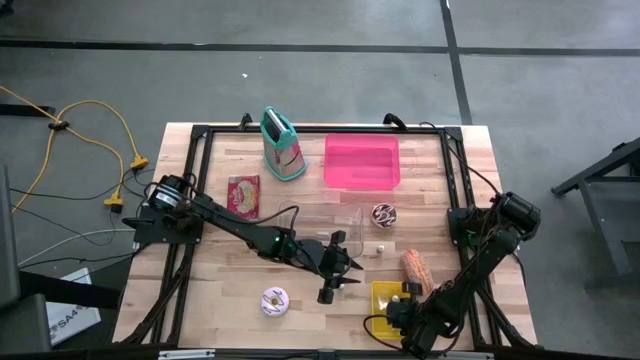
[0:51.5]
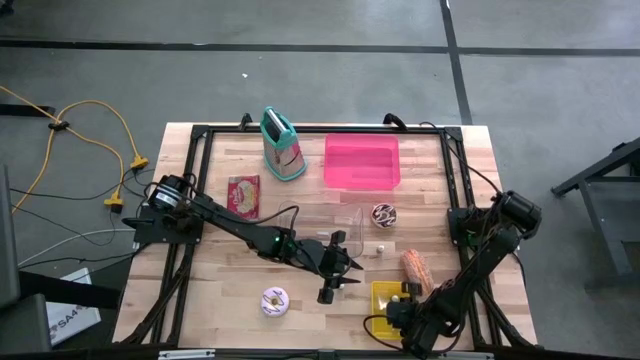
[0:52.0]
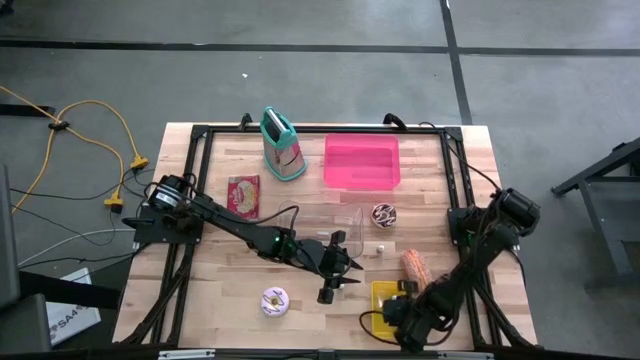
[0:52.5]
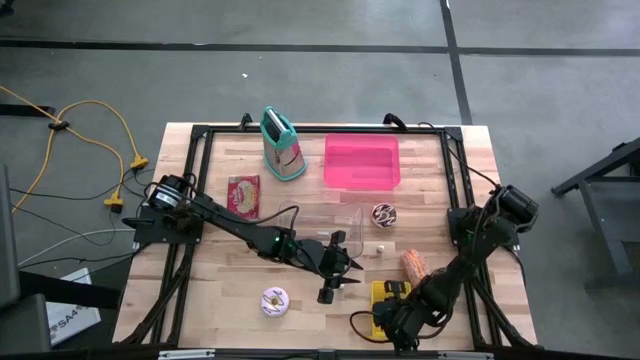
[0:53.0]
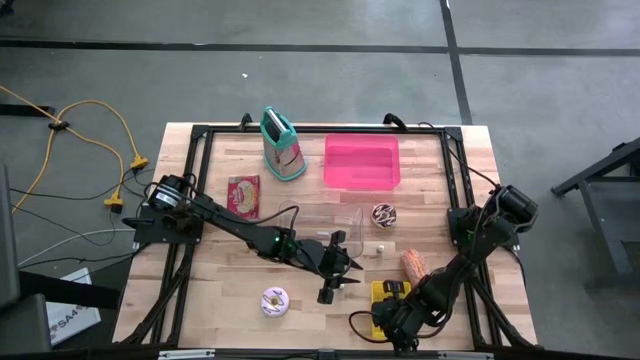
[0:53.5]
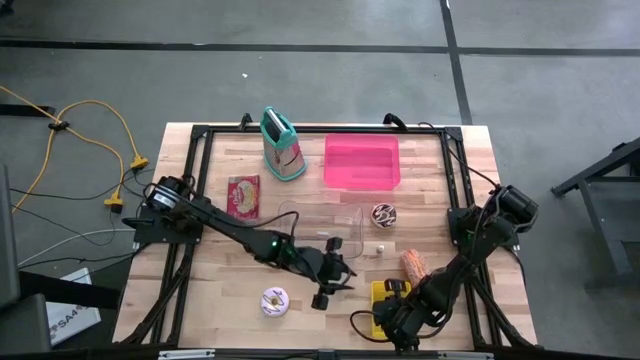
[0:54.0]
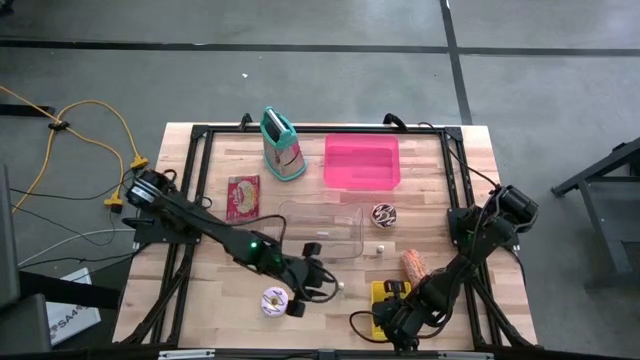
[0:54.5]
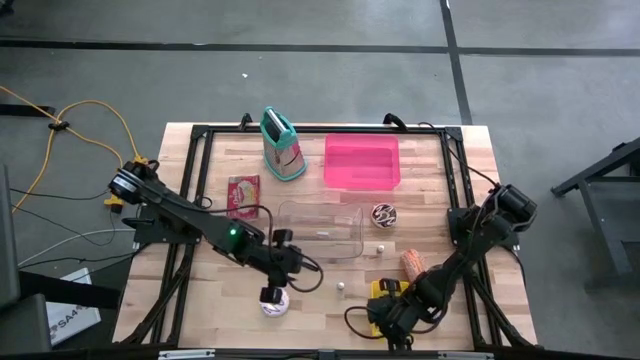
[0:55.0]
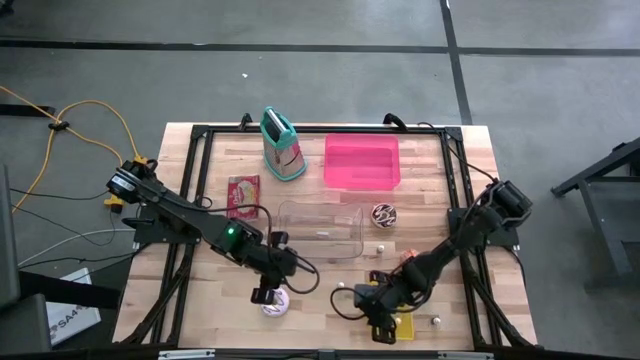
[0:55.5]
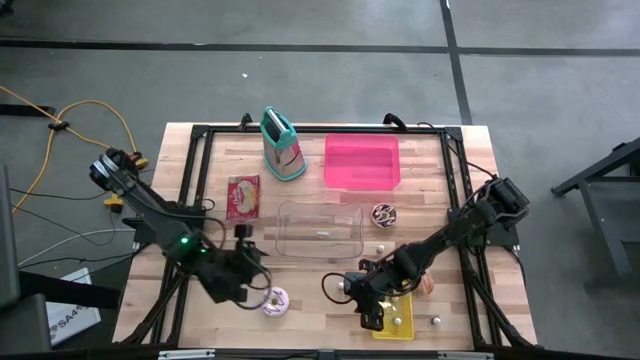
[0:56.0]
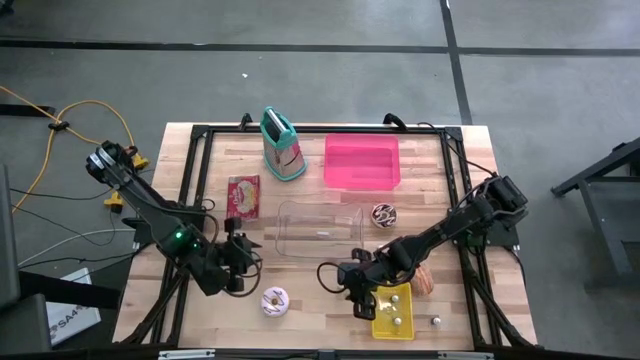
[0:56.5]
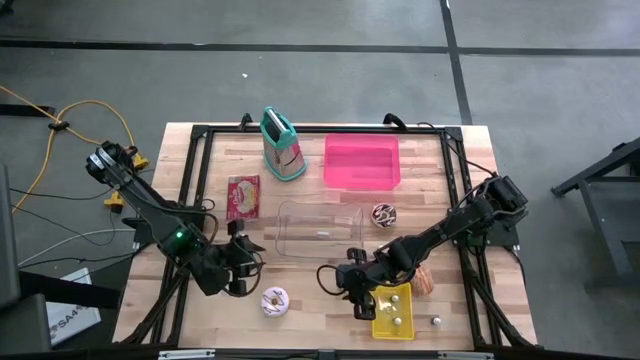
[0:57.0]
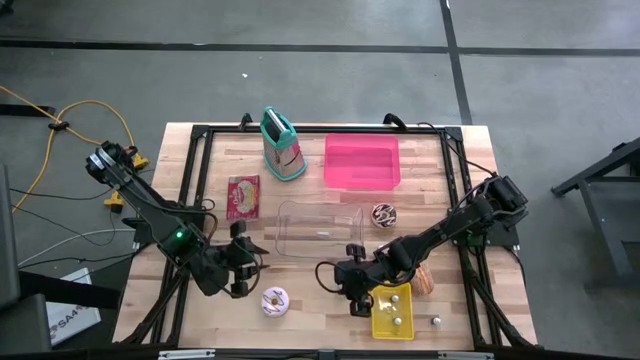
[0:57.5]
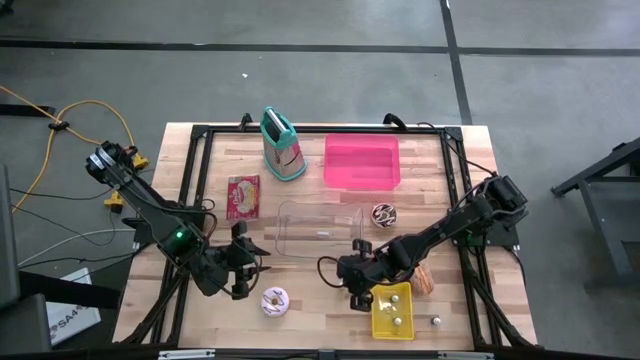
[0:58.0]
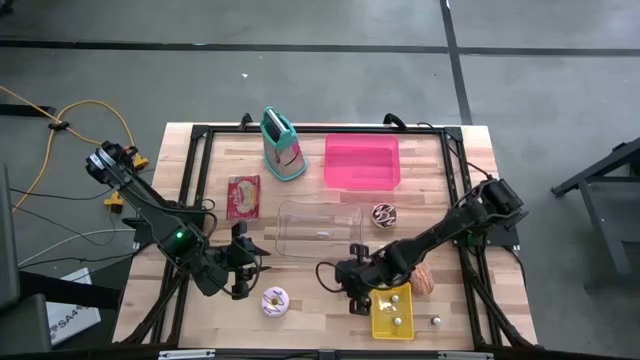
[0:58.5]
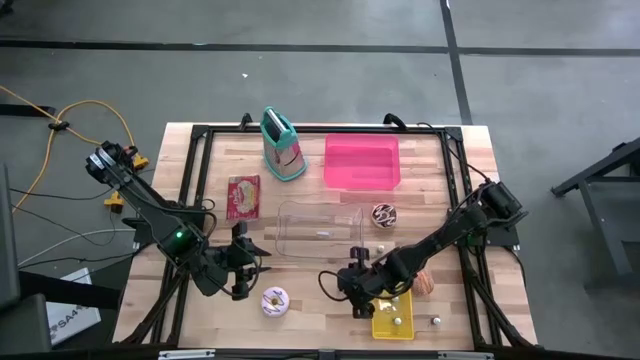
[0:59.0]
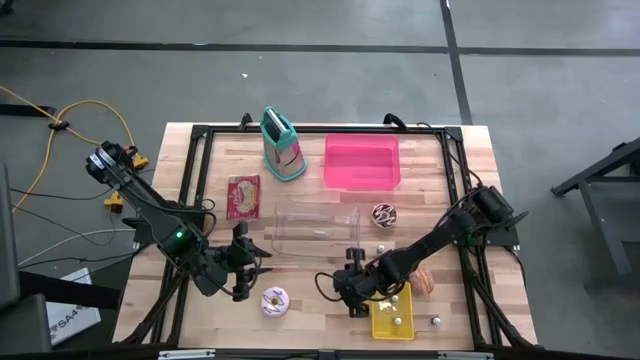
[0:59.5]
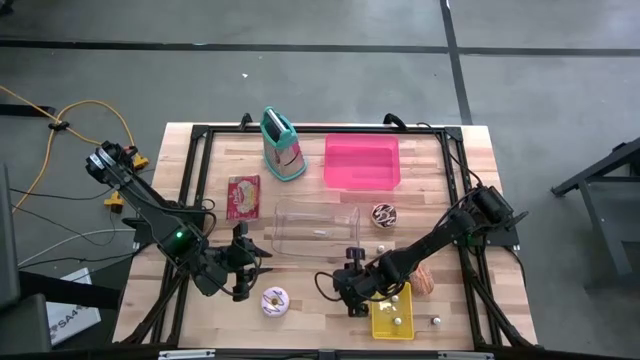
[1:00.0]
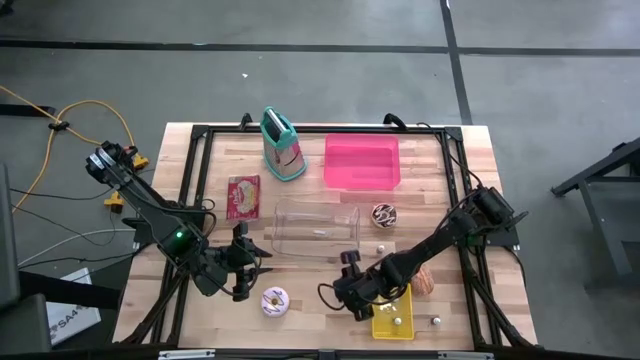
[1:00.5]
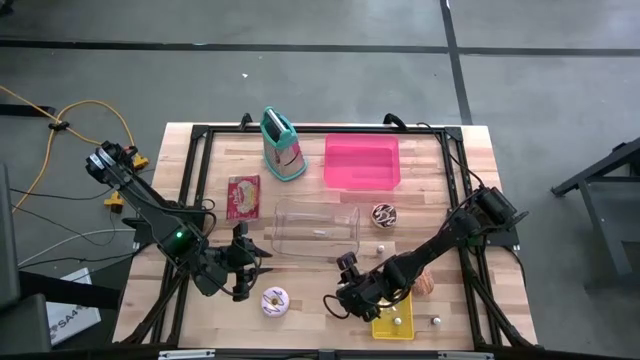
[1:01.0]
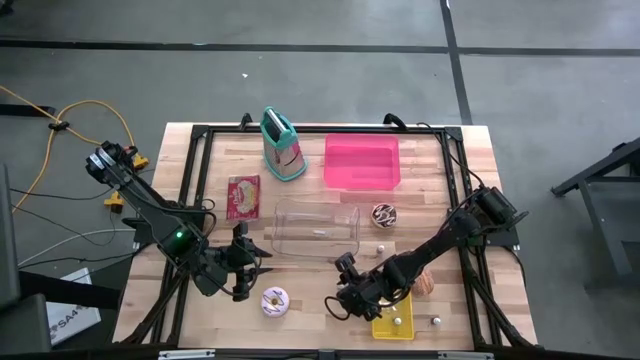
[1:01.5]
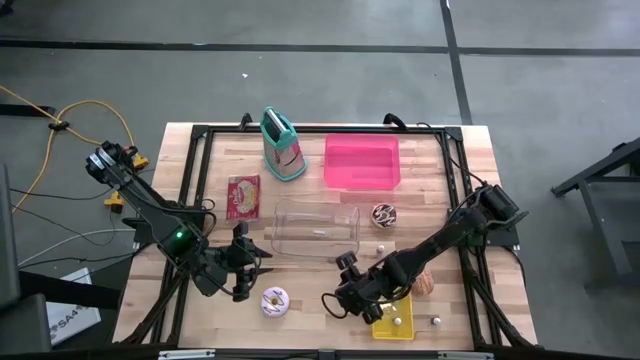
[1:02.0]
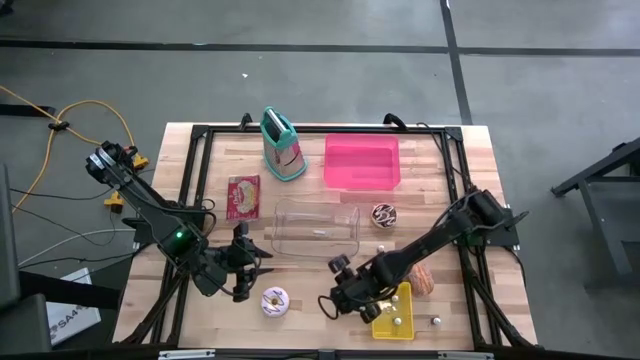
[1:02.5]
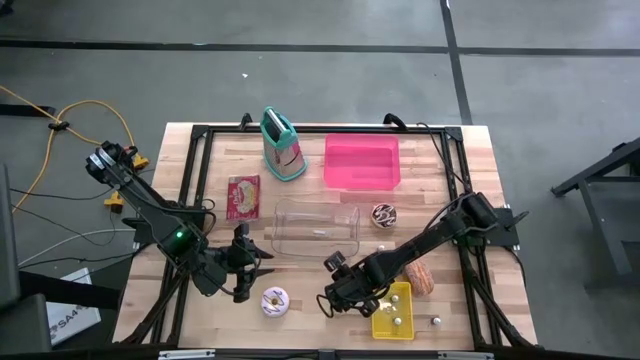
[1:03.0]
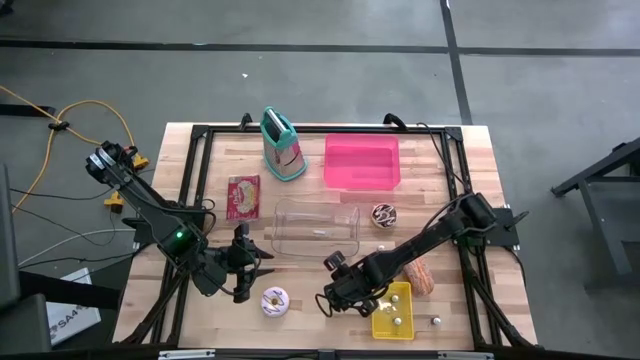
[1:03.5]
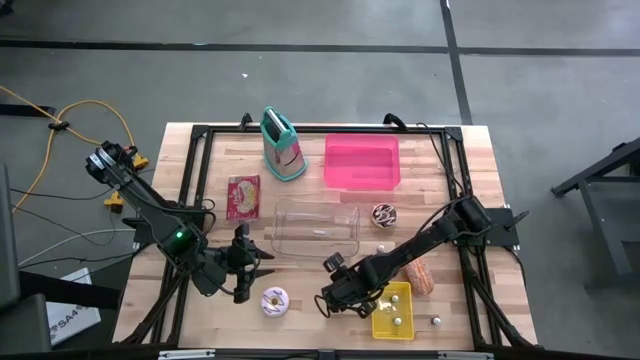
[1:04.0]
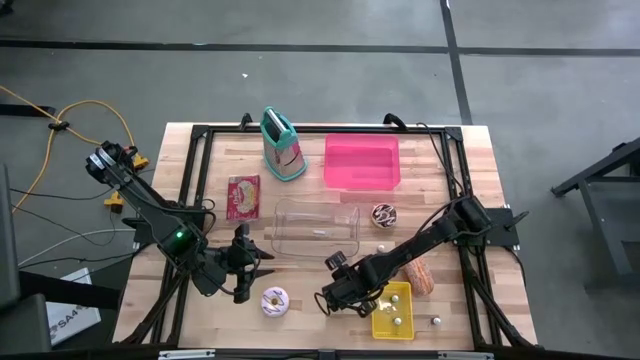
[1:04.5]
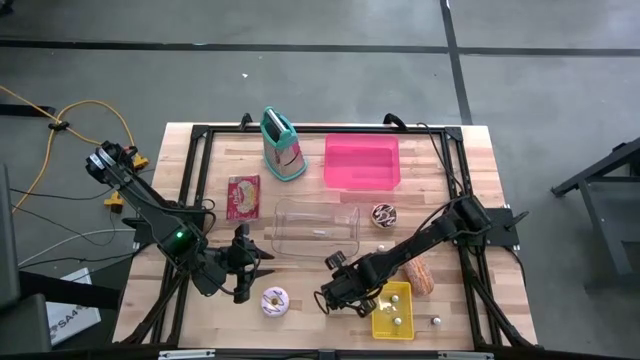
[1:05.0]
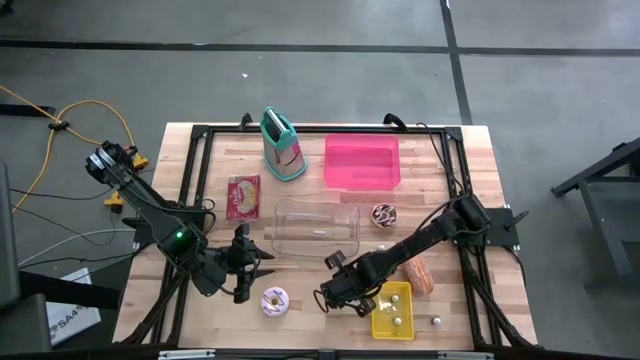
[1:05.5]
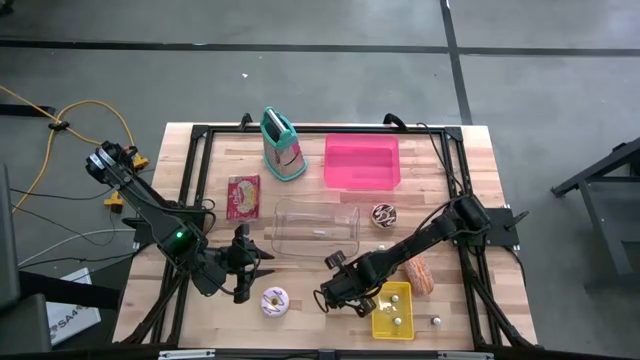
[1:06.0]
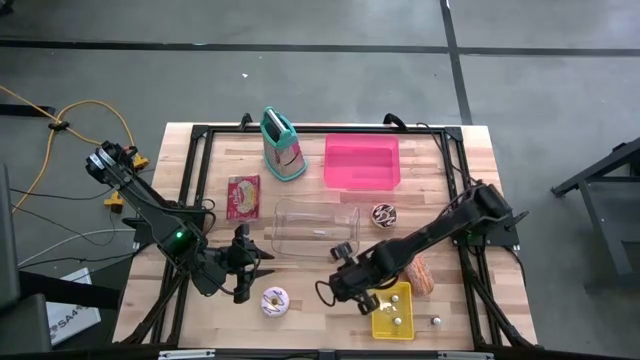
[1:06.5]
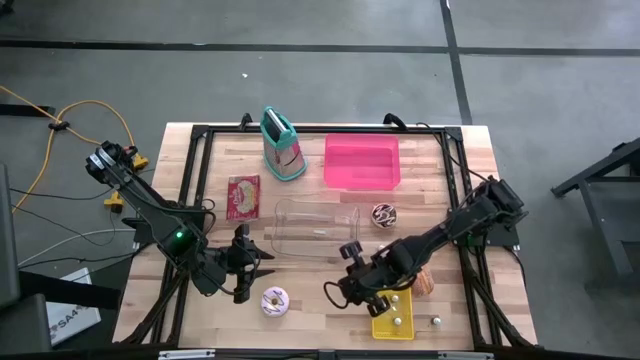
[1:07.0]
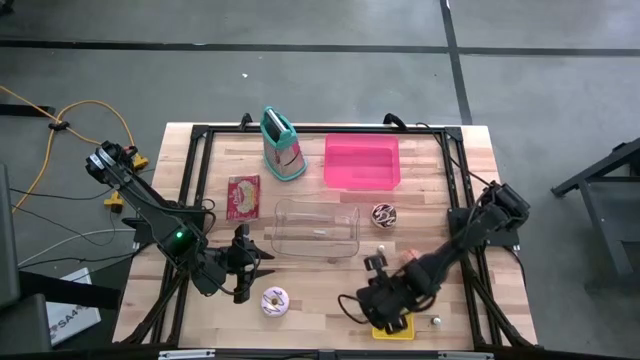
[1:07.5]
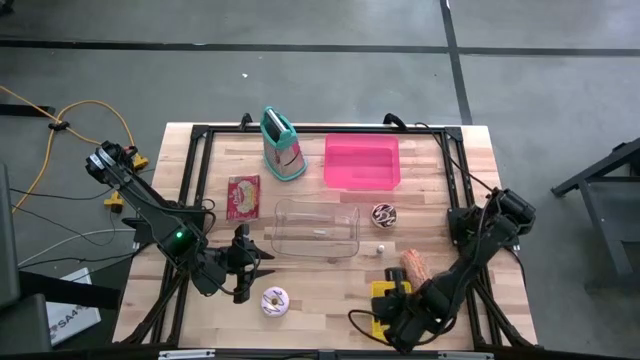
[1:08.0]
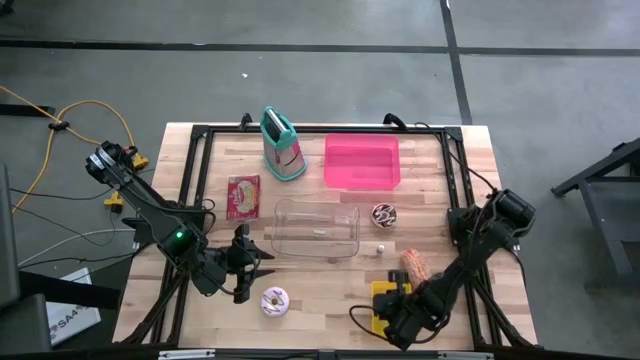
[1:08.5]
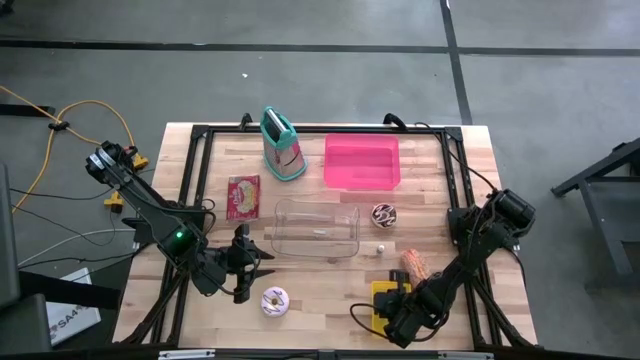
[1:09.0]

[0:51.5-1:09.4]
Put the bottom orange food coloring bottle into the yellow bin
